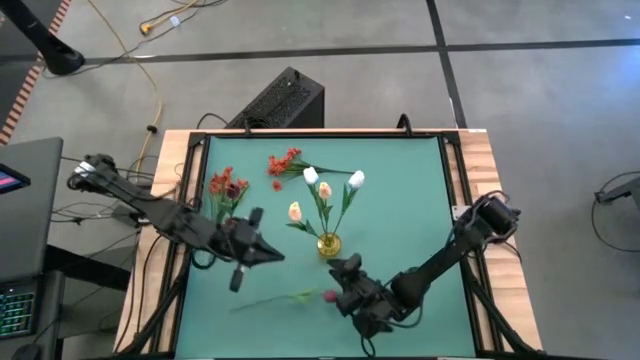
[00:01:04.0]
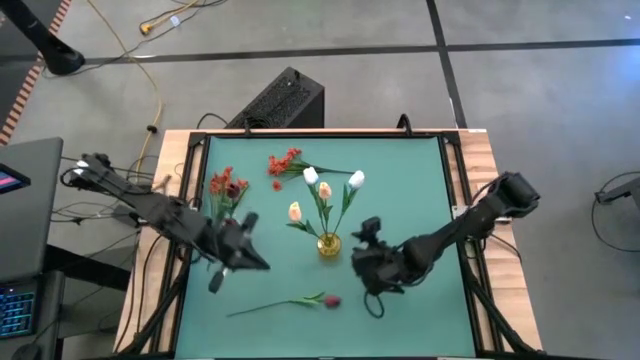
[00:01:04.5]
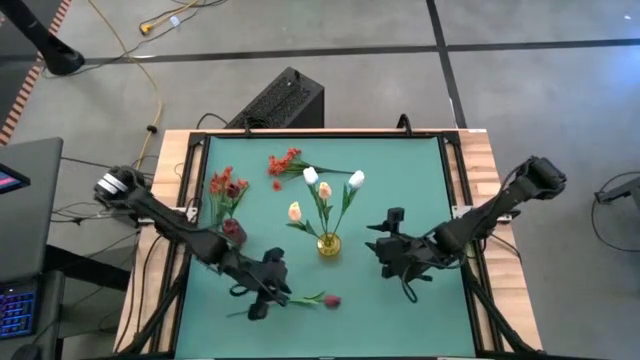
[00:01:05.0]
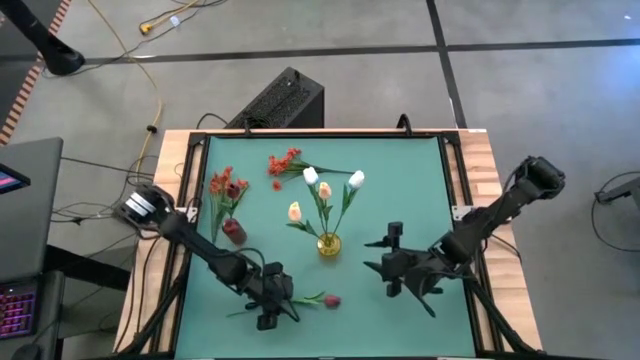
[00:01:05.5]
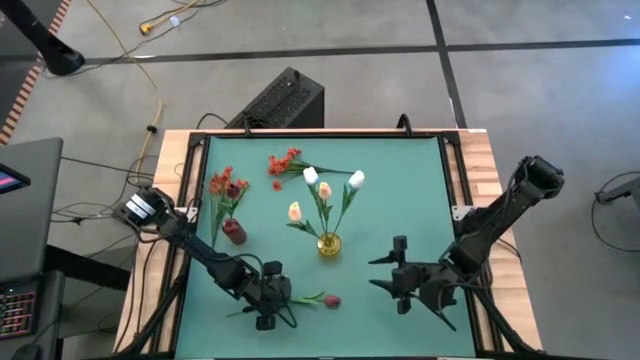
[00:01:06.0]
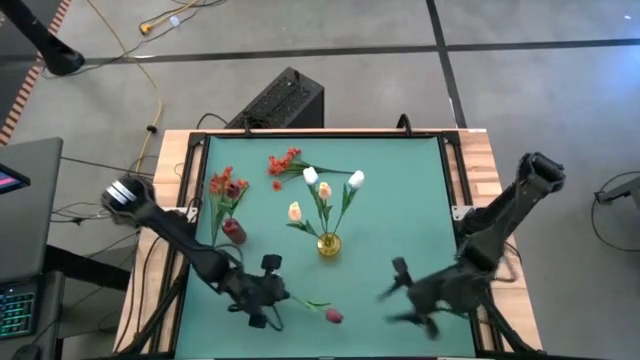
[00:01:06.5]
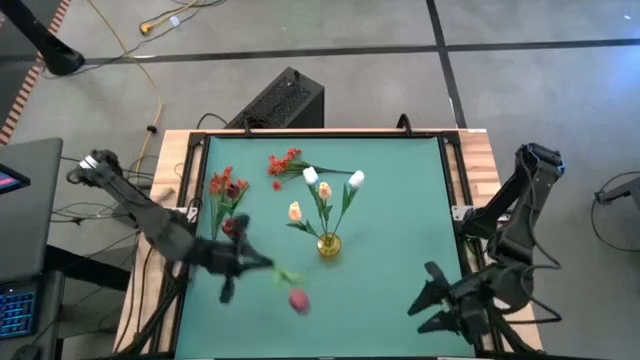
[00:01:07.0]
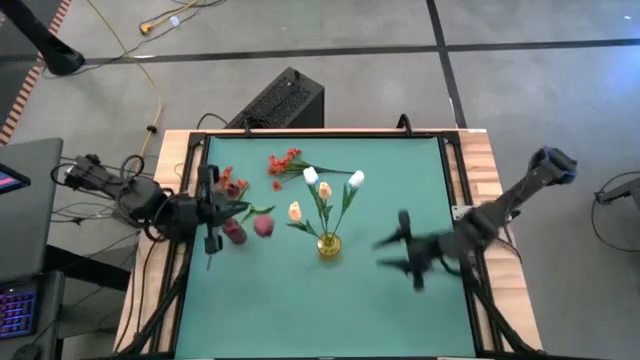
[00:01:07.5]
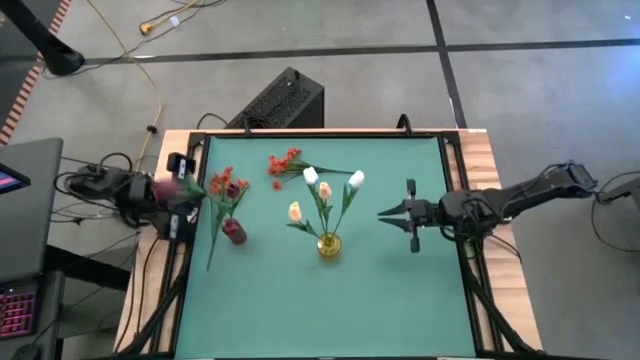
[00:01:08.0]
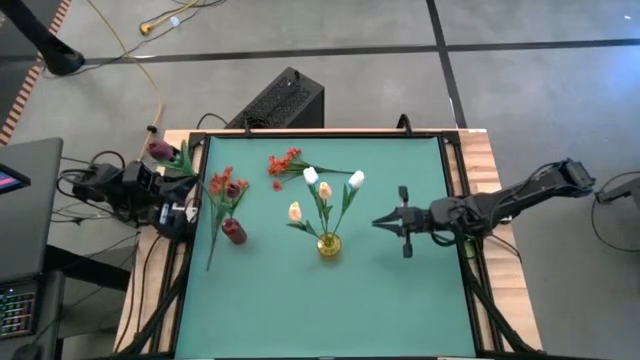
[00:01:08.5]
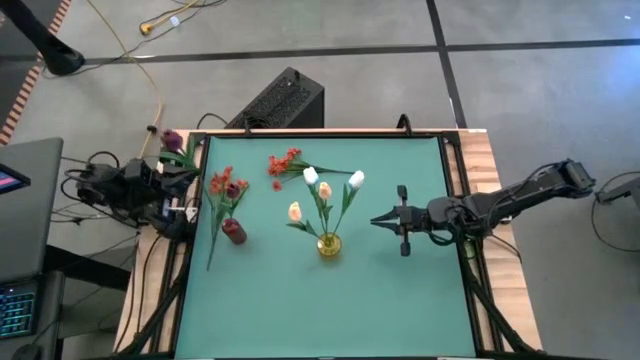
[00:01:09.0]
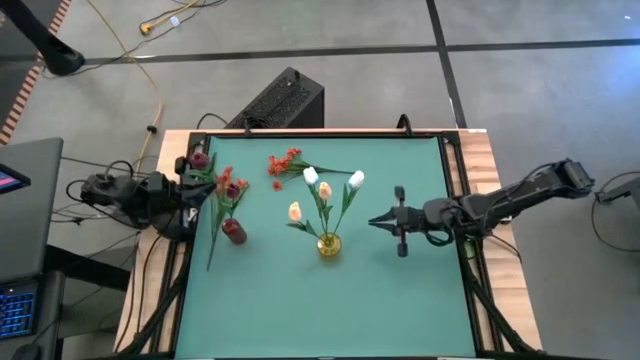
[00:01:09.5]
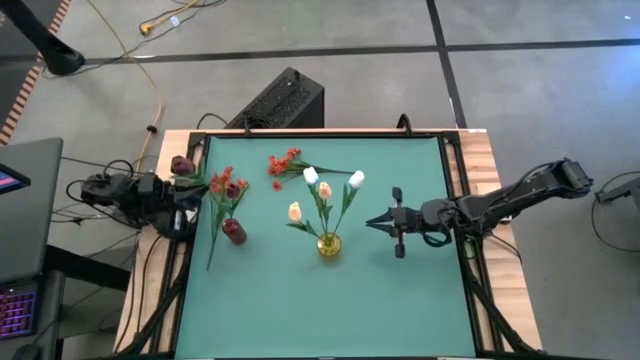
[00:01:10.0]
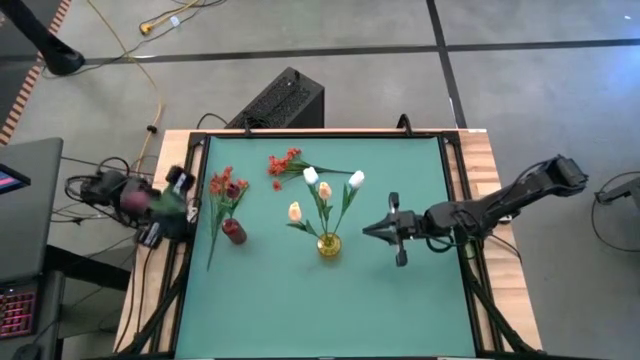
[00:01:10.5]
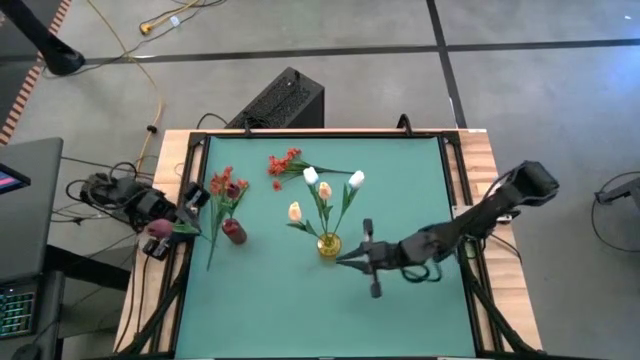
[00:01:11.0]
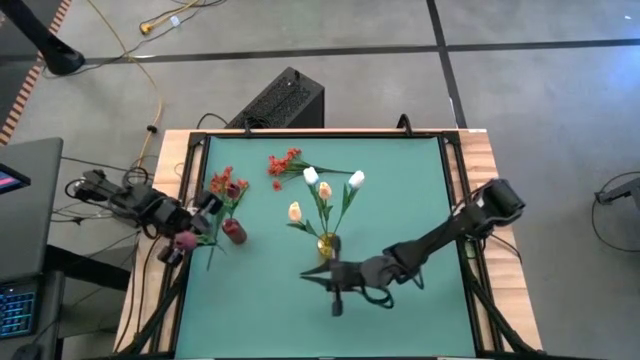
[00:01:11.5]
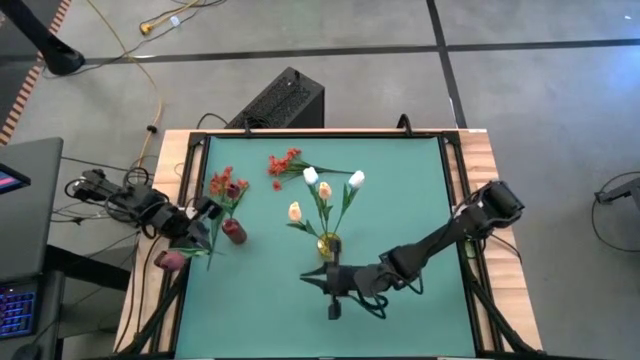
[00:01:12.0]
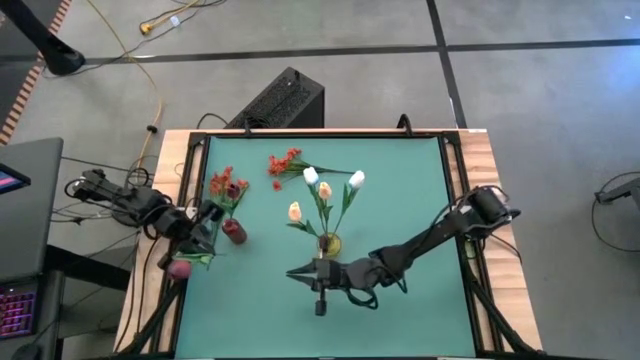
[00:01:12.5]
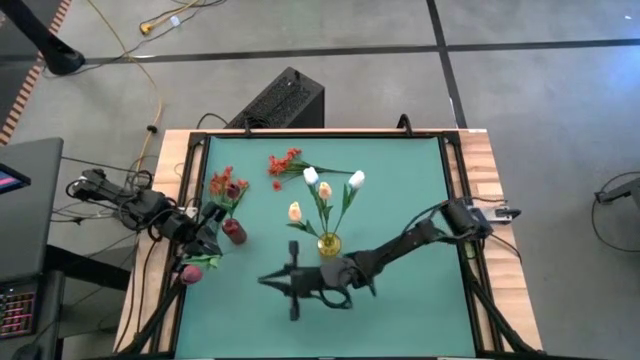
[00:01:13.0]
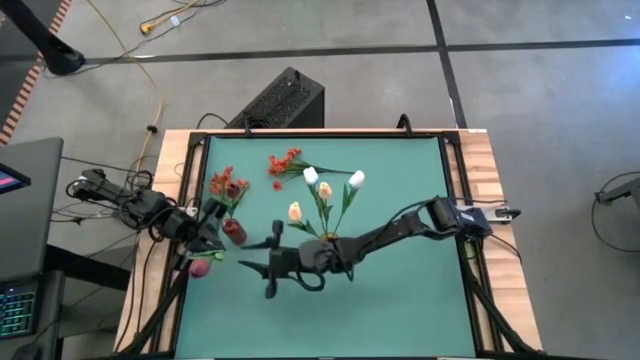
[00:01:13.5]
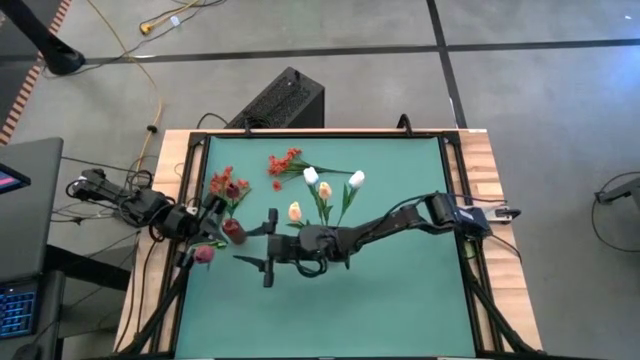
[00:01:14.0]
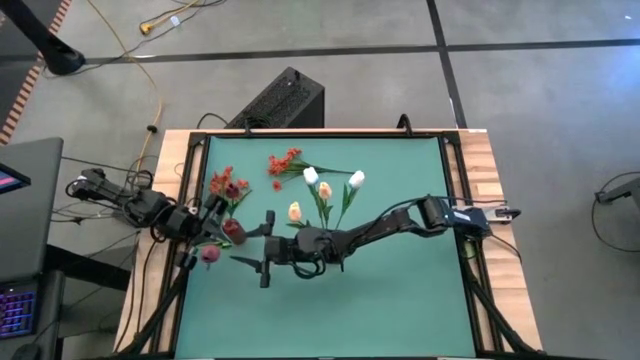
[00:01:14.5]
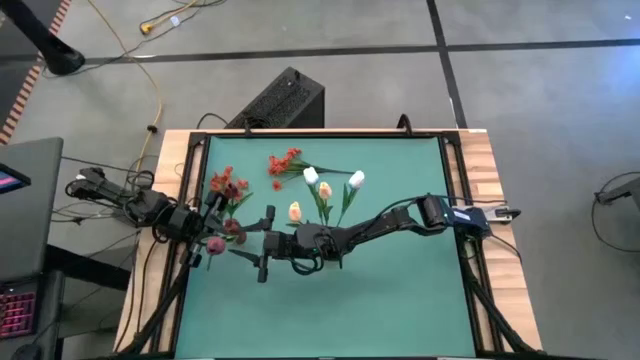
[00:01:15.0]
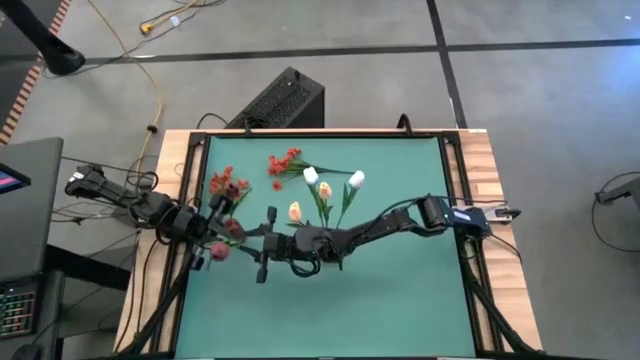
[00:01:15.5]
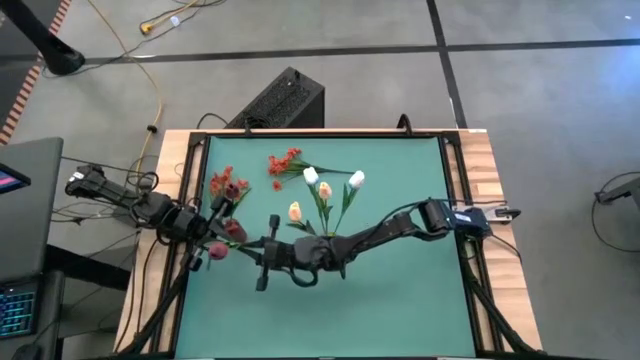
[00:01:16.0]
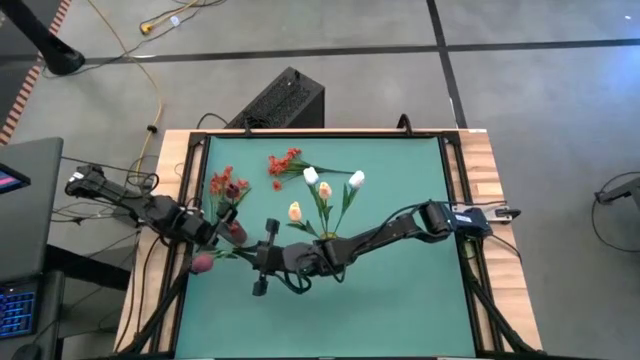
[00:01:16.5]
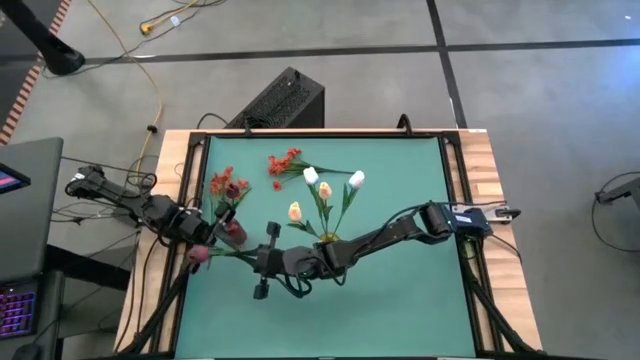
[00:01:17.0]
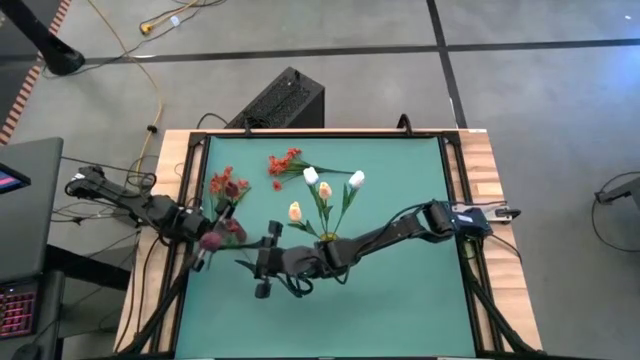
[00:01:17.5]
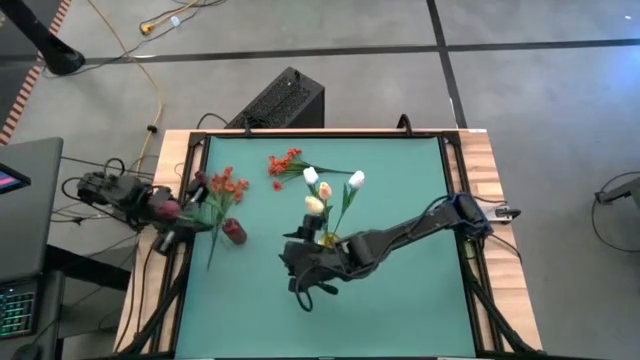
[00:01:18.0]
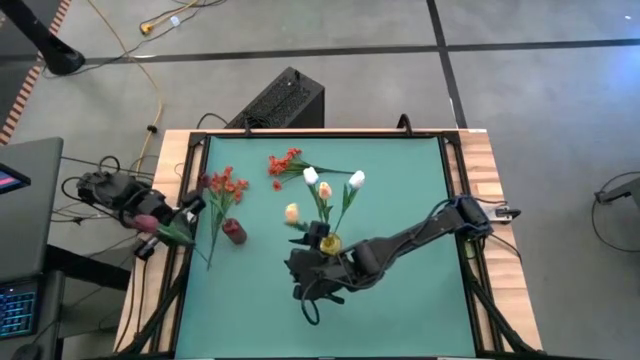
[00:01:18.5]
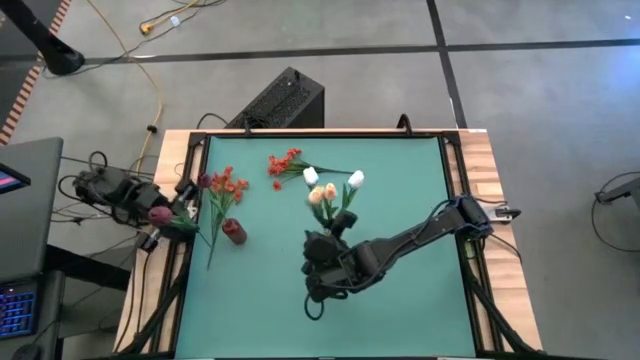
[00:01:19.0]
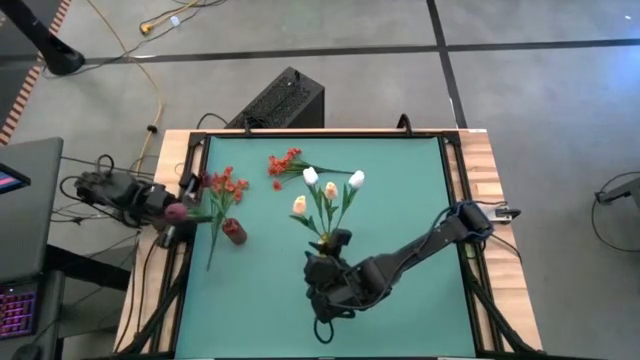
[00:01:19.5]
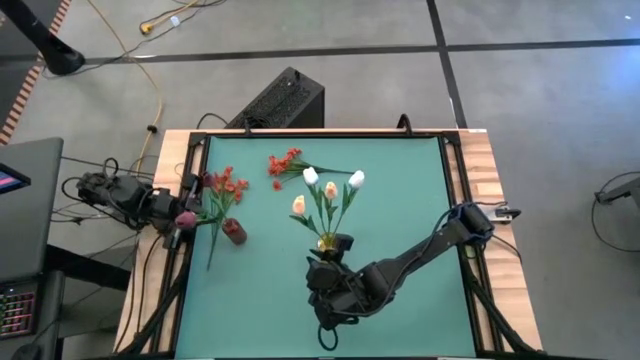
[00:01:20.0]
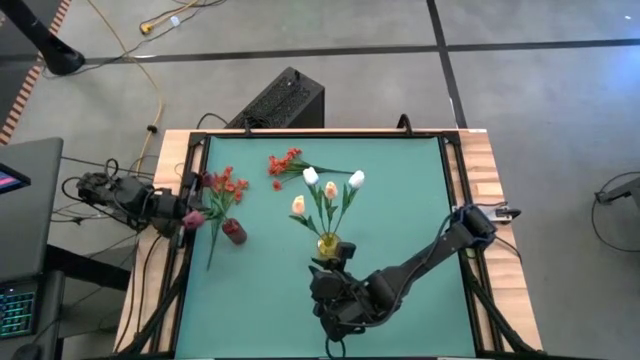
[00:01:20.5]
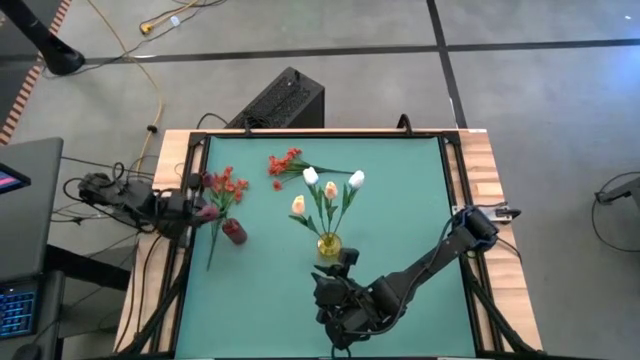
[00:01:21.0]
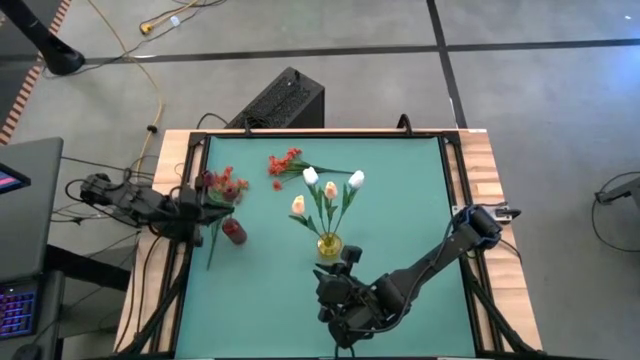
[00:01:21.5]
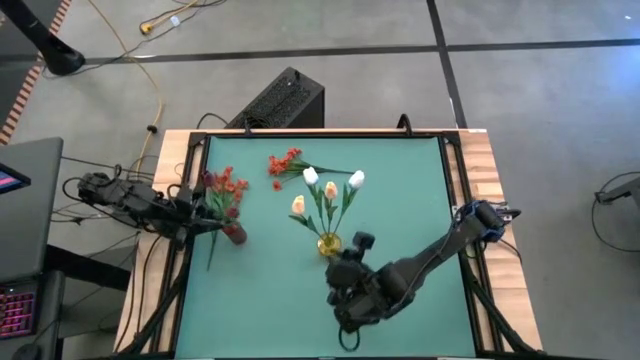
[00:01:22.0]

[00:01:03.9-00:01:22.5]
Task: Sort flowers into vase by color
Put the red flower into the red vase

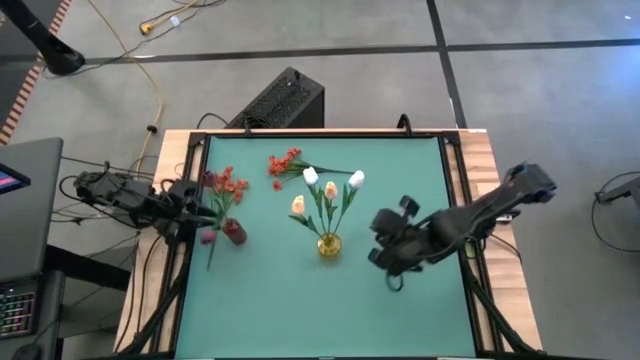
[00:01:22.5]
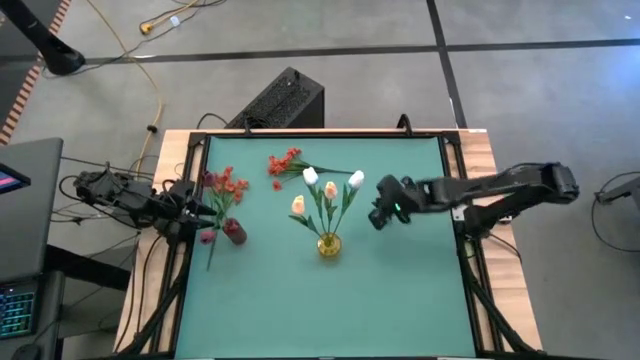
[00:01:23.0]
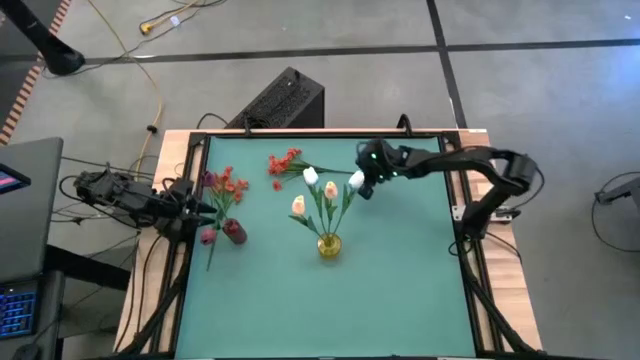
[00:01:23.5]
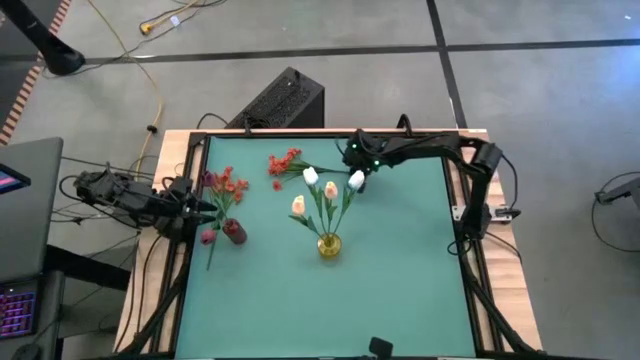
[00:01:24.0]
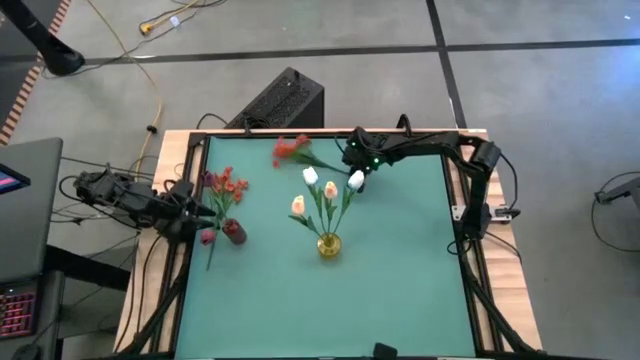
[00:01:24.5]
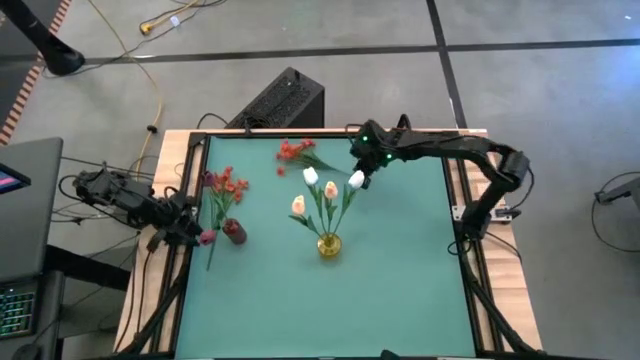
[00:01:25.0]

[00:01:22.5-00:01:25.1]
Put the right orange flowers into the red vase
